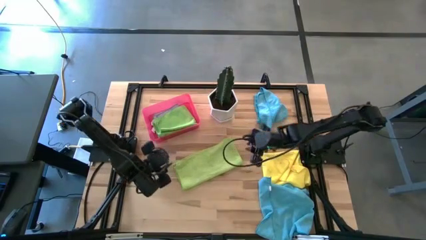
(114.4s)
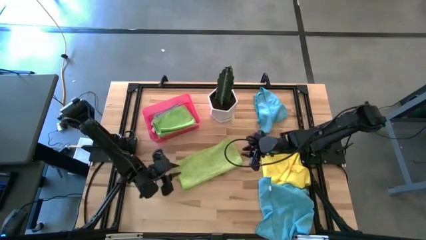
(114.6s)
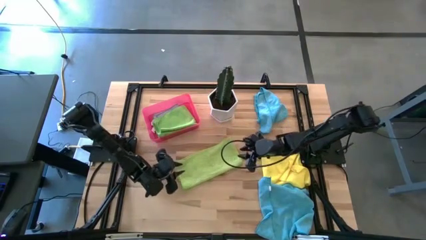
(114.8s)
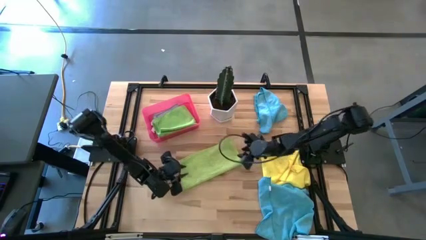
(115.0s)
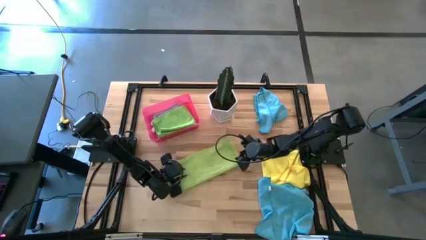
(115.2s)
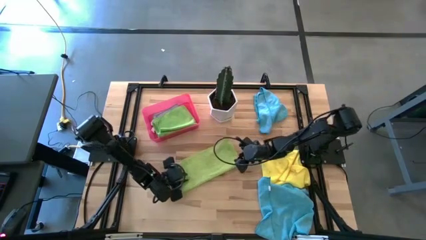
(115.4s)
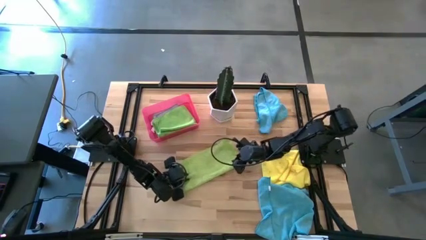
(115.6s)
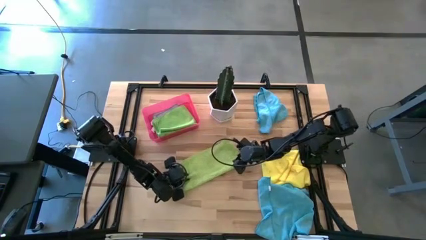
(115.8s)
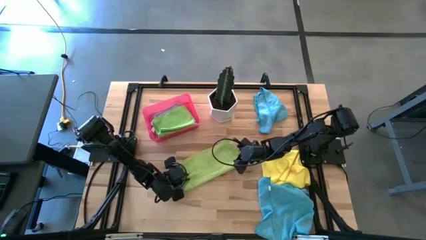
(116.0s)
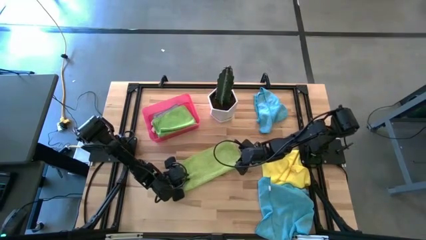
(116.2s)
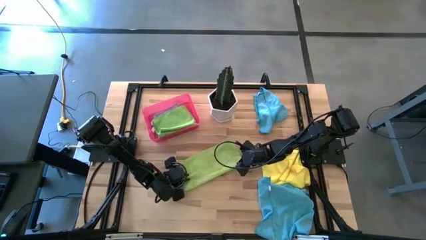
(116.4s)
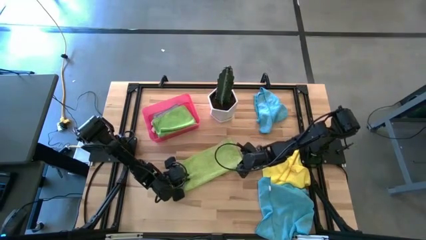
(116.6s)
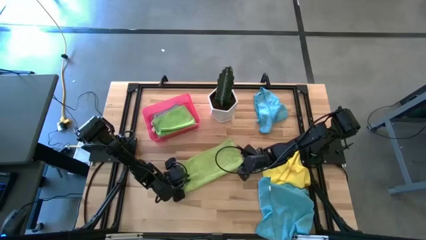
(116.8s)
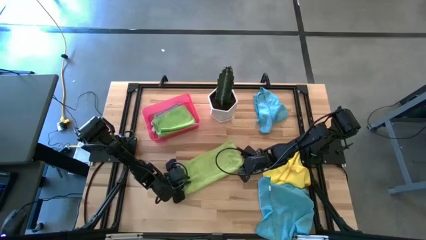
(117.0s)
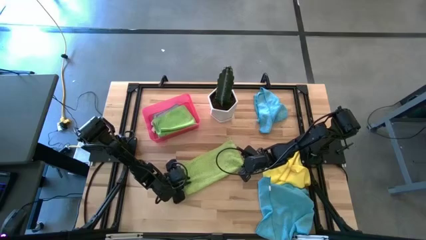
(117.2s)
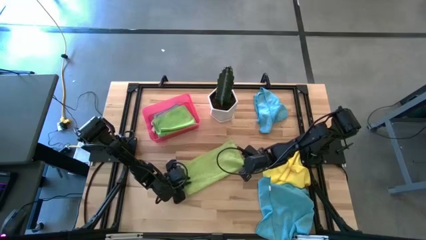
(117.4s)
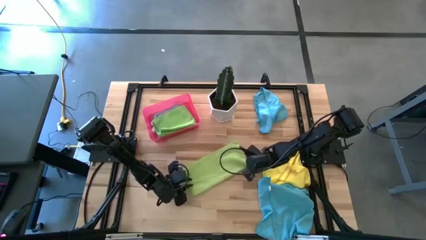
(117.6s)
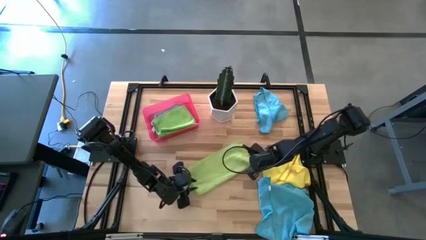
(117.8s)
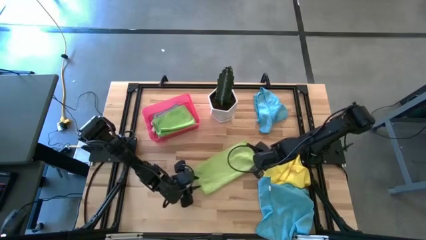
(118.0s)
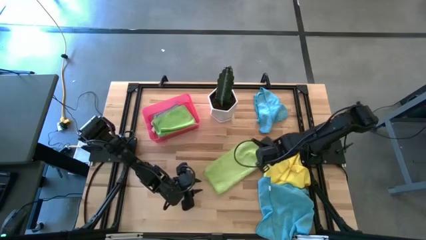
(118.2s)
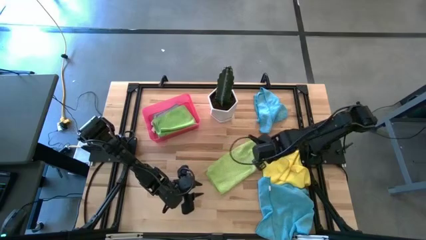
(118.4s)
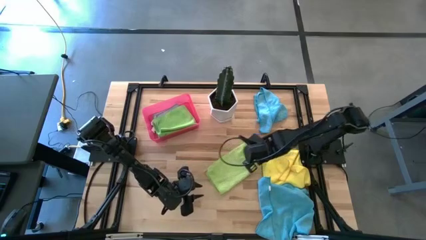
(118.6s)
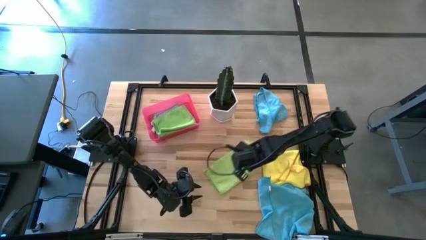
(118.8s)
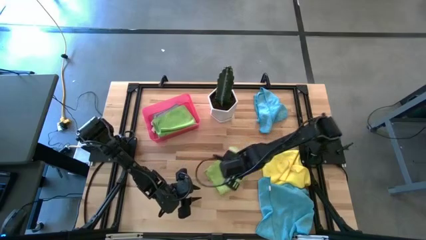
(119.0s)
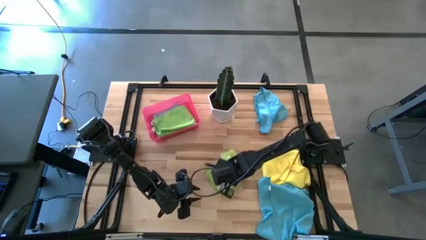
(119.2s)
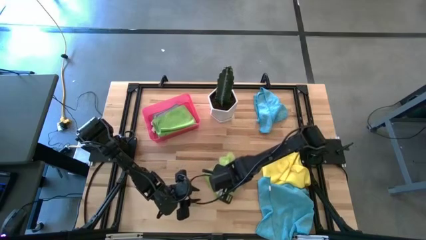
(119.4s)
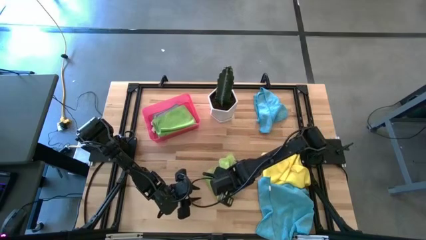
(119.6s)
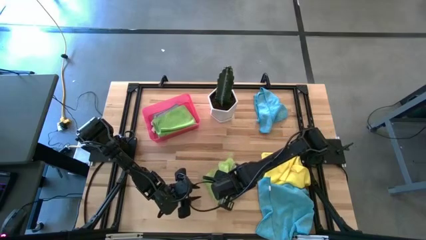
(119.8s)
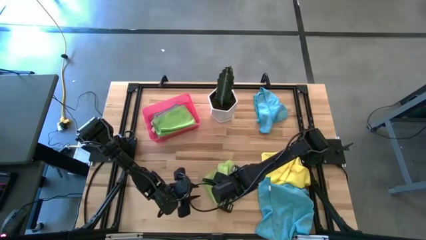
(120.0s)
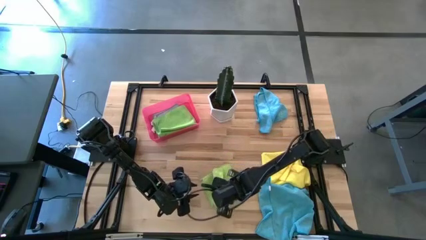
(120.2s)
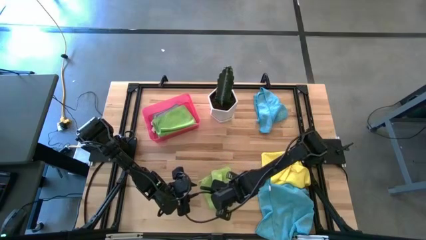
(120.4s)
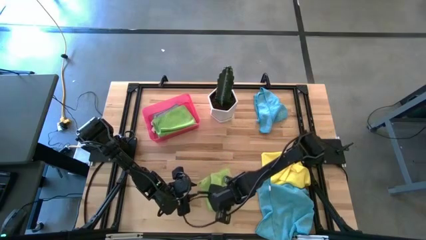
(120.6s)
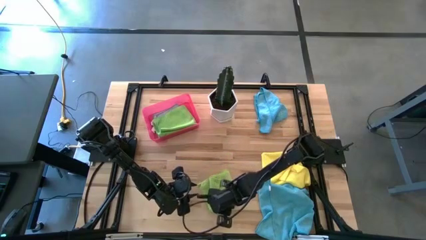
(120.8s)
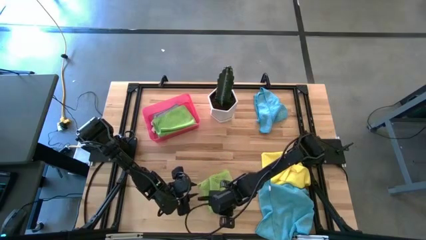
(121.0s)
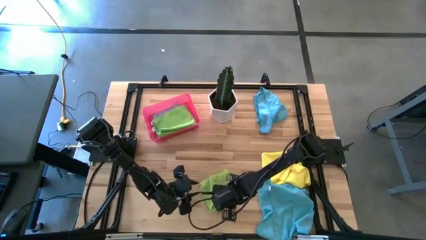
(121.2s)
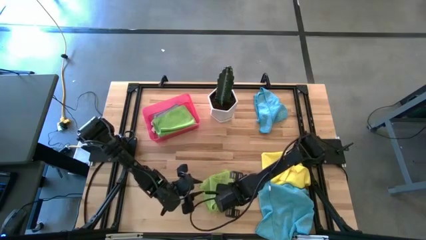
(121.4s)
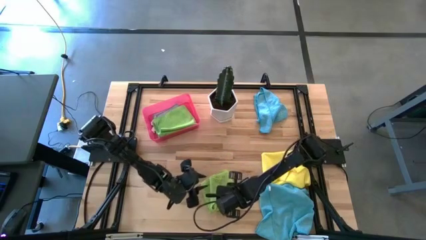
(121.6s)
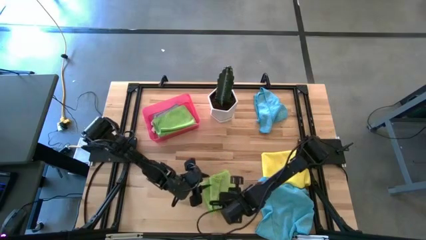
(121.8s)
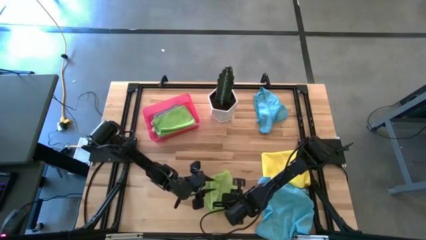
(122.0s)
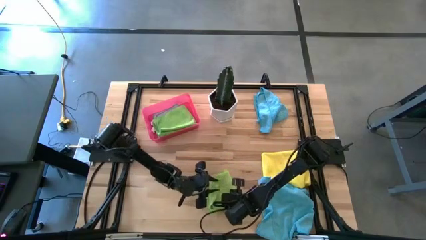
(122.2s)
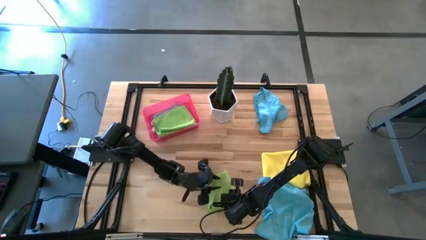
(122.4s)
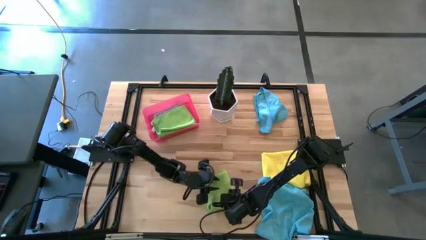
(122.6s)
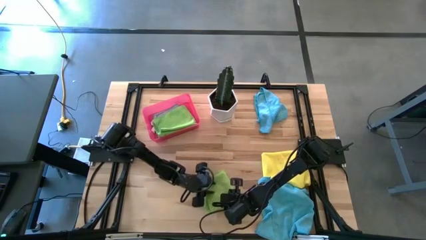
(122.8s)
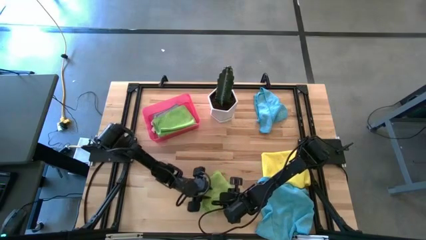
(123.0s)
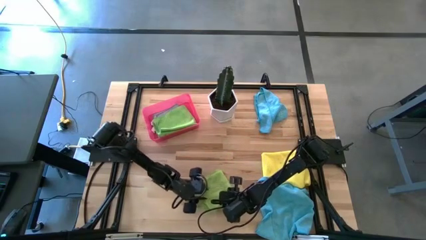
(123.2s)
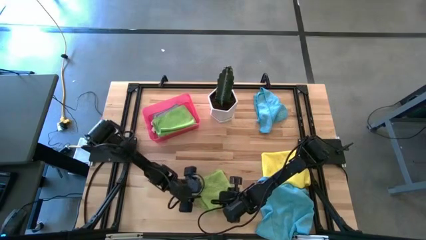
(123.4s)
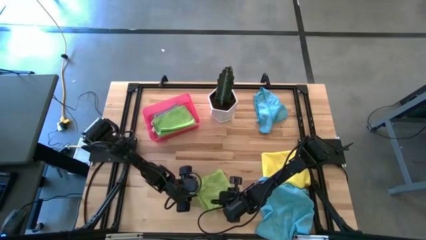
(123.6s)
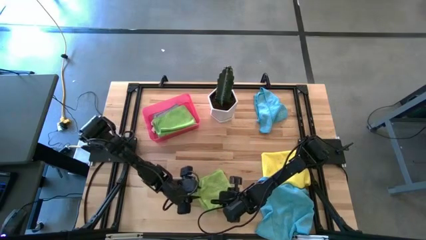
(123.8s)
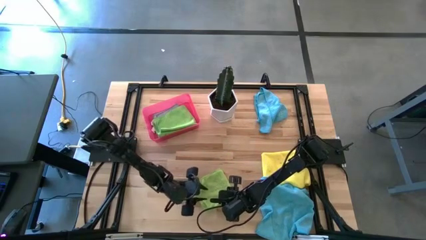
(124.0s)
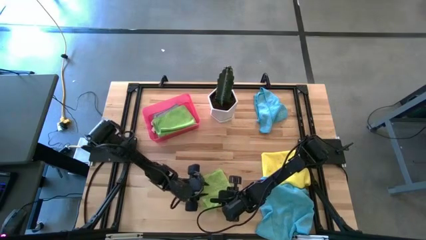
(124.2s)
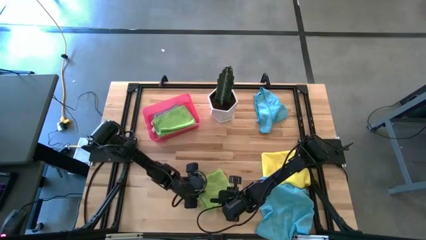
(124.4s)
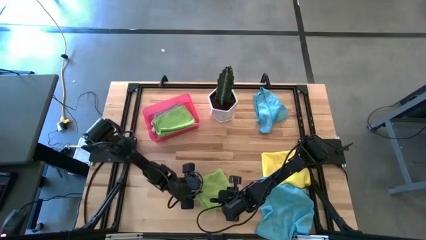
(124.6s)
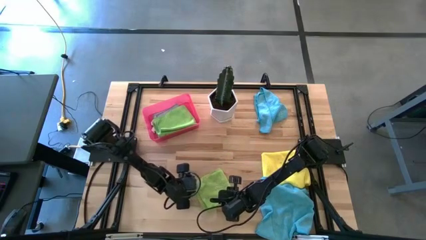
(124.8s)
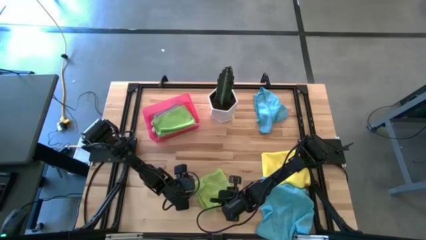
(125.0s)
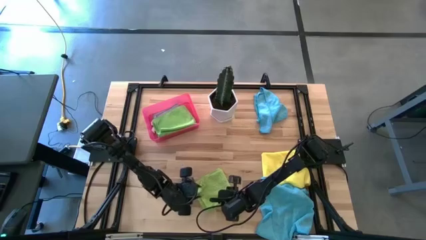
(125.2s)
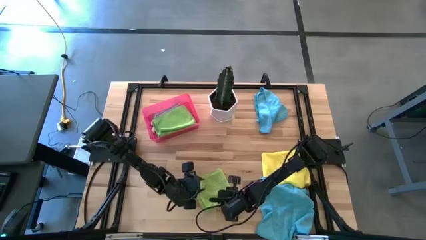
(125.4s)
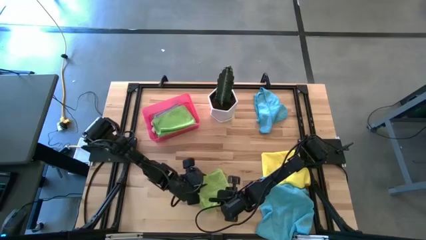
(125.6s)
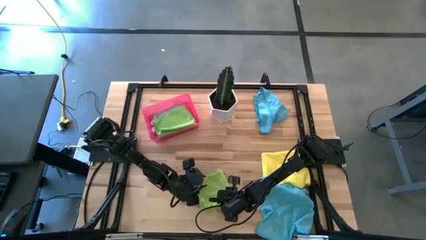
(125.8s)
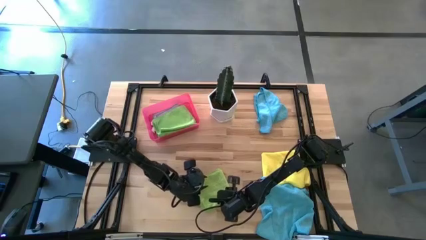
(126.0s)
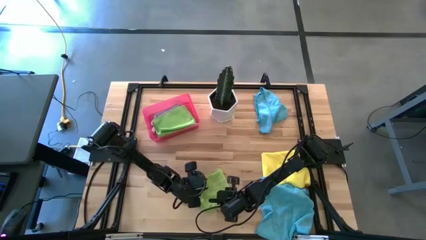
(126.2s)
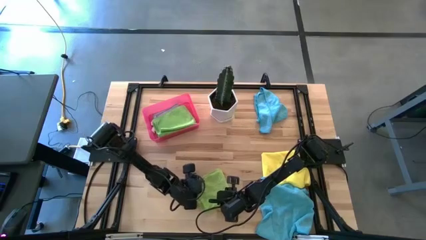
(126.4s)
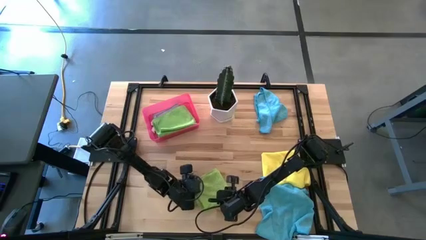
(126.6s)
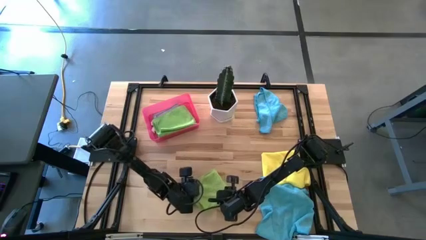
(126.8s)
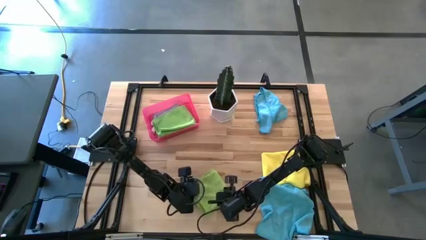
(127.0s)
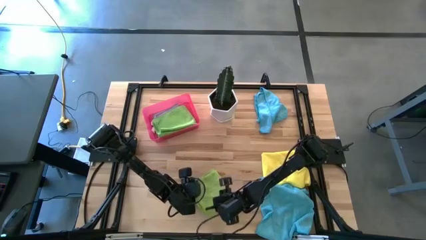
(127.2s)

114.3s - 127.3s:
Task: Fold microfiber towels
Fold the light green microfiber cloth
